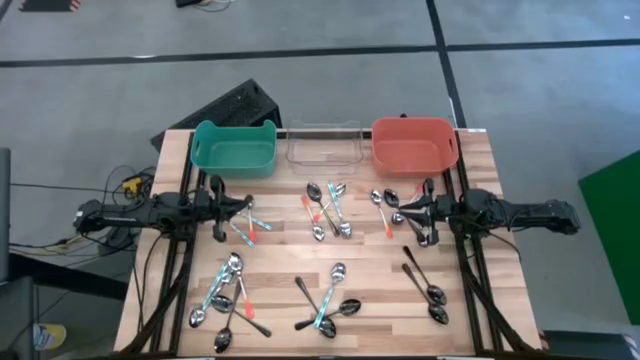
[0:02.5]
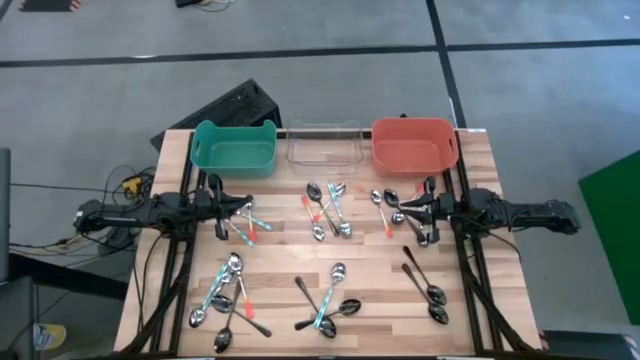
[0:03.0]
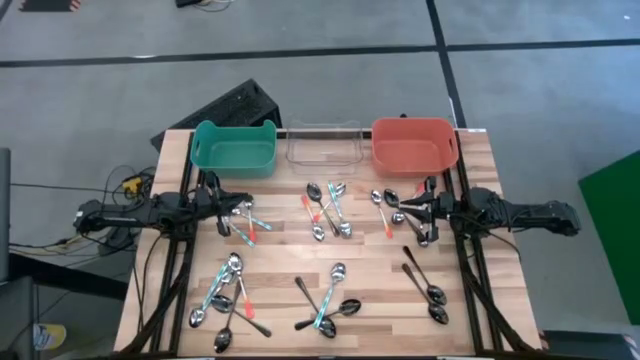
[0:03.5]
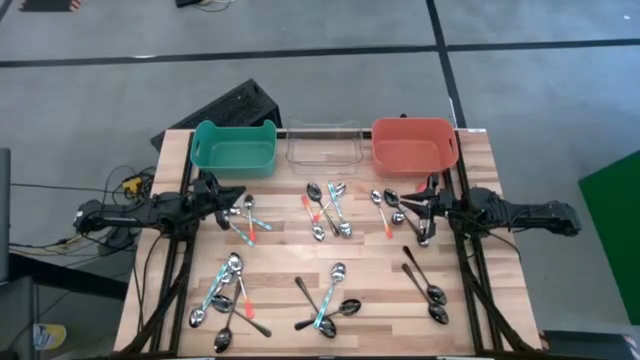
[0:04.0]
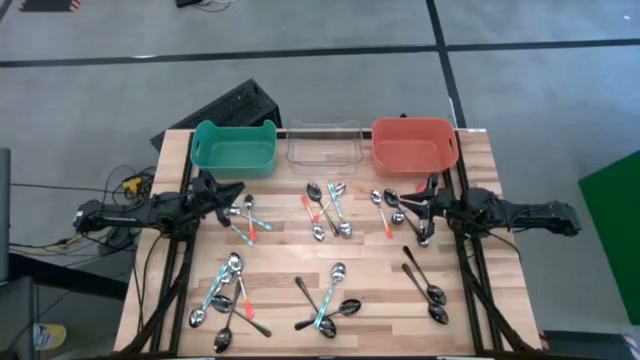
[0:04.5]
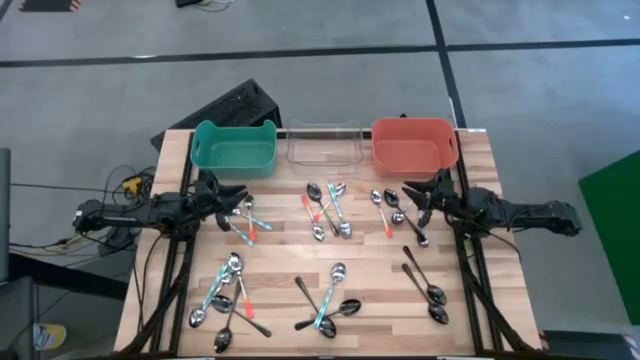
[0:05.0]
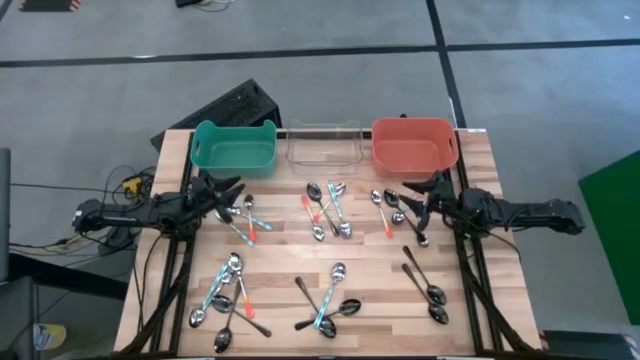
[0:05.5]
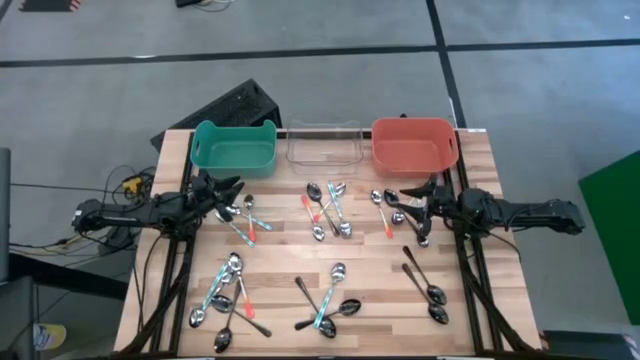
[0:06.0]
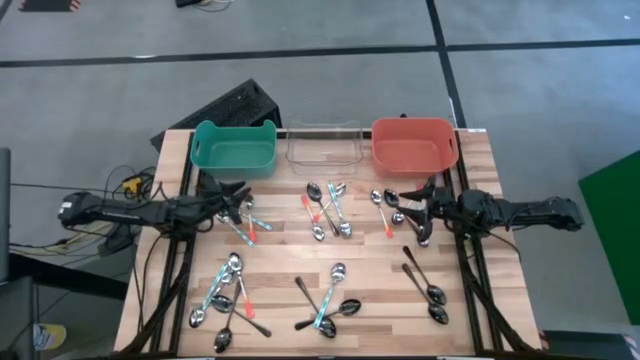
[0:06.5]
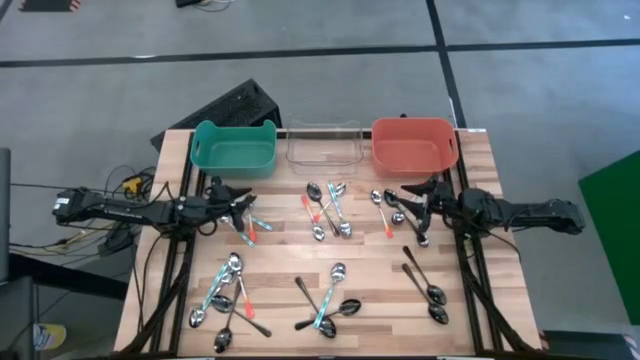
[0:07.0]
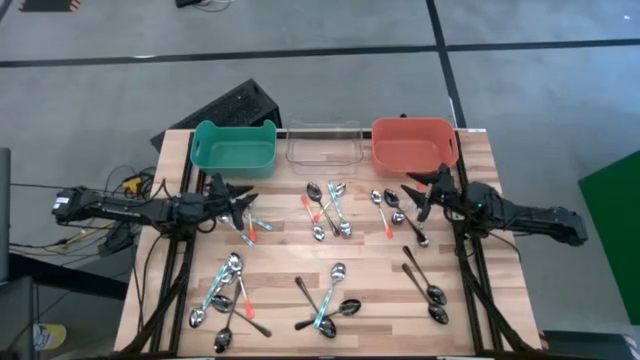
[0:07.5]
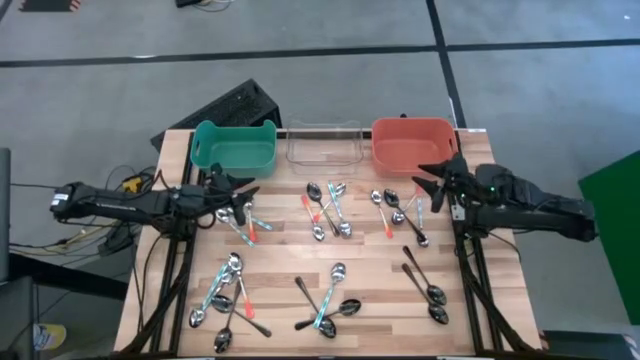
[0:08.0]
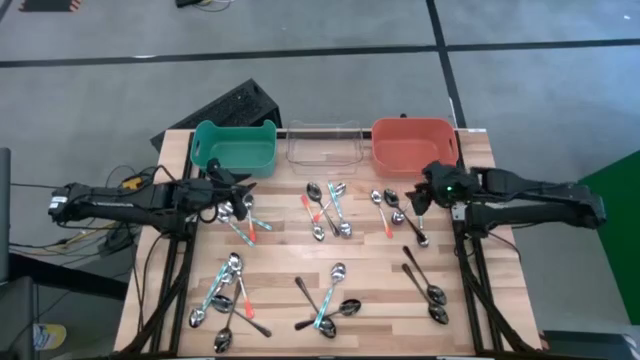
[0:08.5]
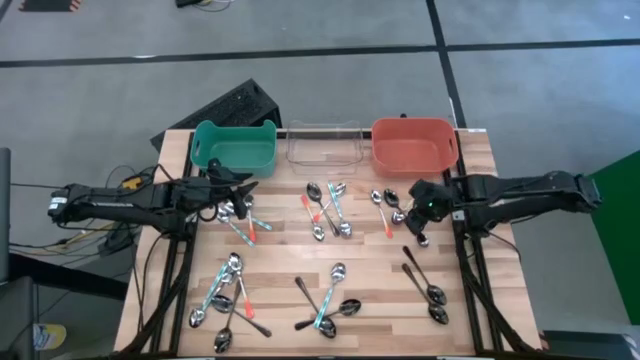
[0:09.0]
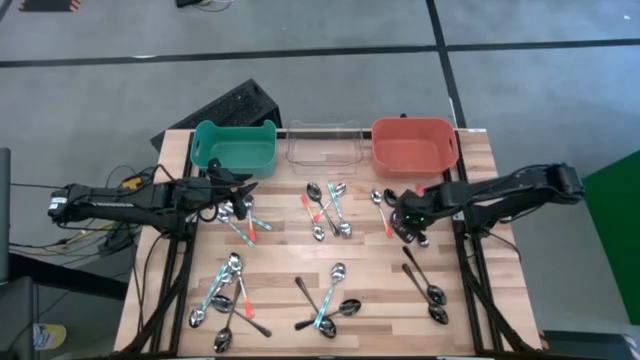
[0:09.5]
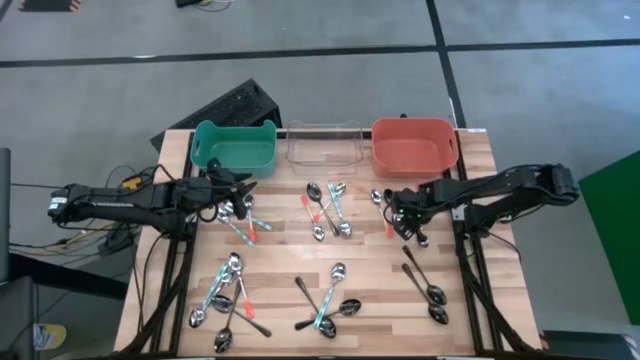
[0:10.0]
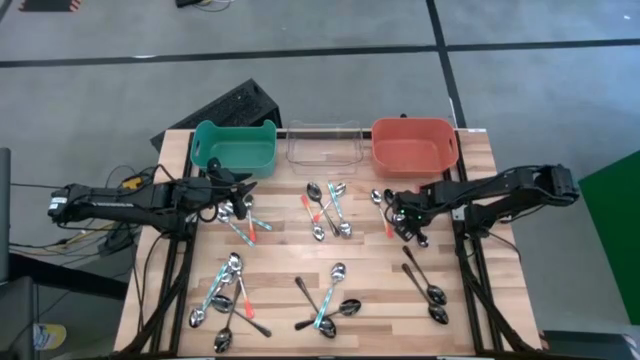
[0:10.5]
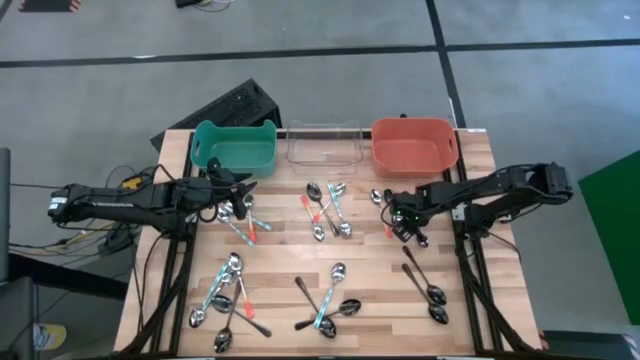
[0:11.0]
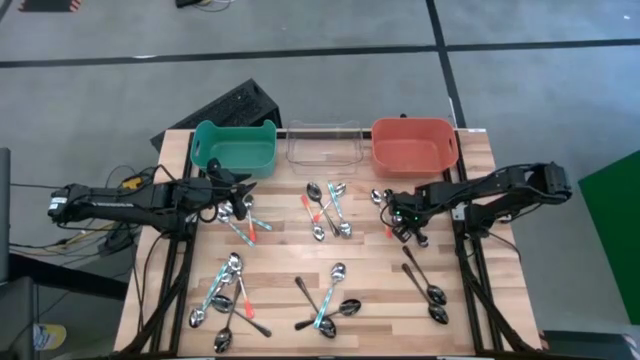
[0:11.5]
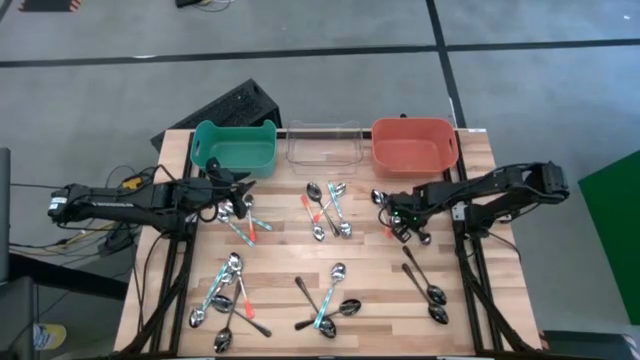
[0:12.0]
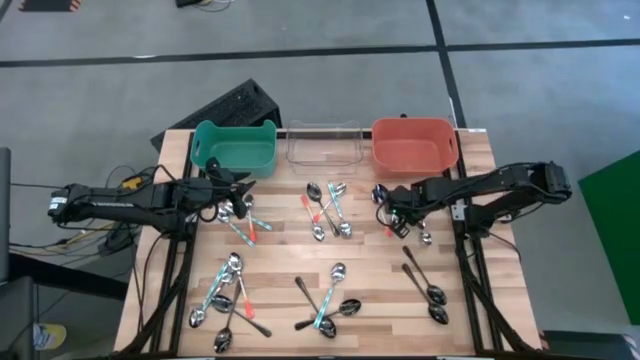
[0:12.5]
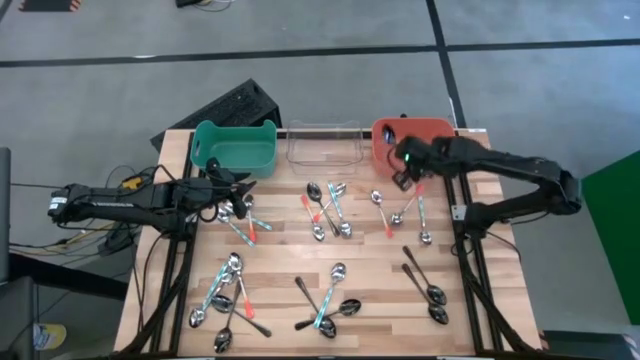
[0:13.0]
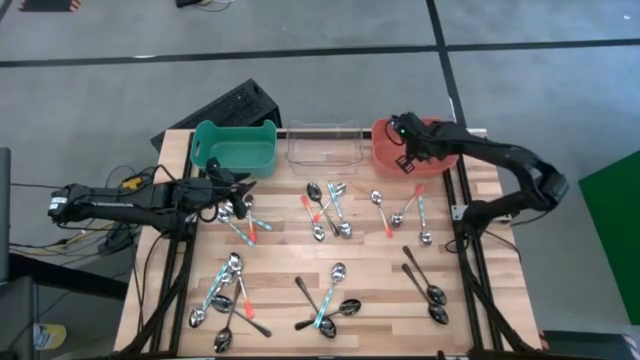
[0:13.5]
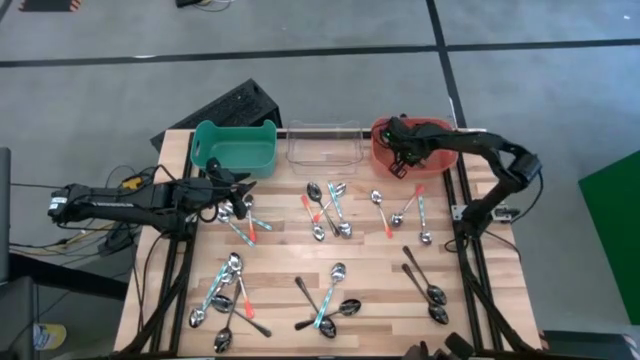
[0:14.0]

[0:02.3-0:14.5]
Task: Sort silverware by color (type)
Put the black spoon into the orange bin

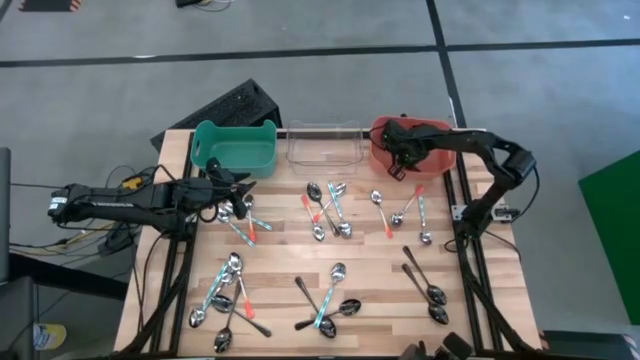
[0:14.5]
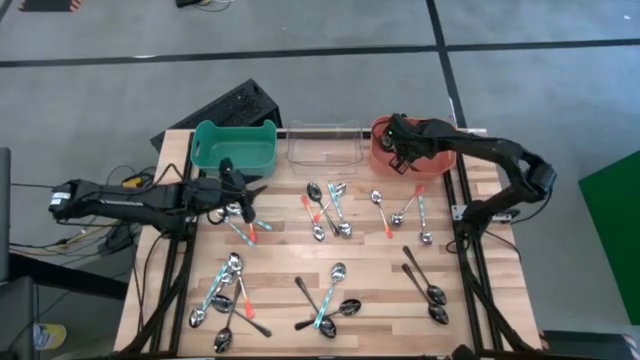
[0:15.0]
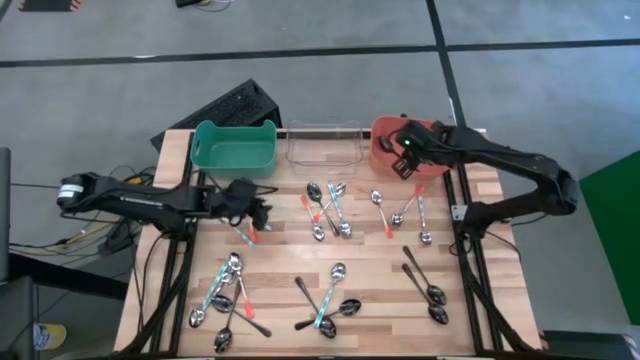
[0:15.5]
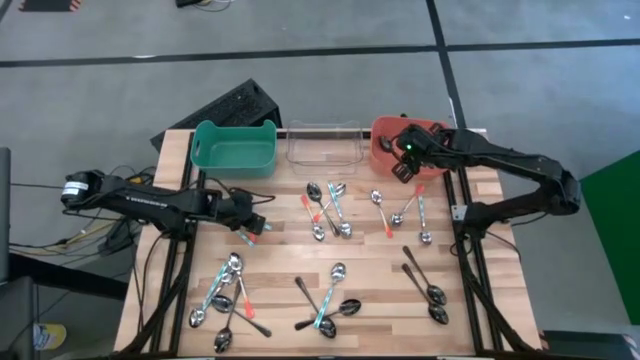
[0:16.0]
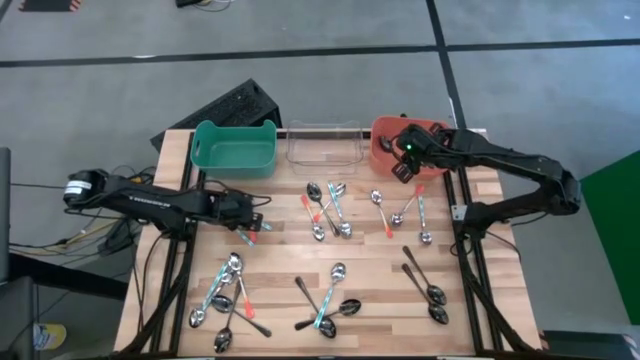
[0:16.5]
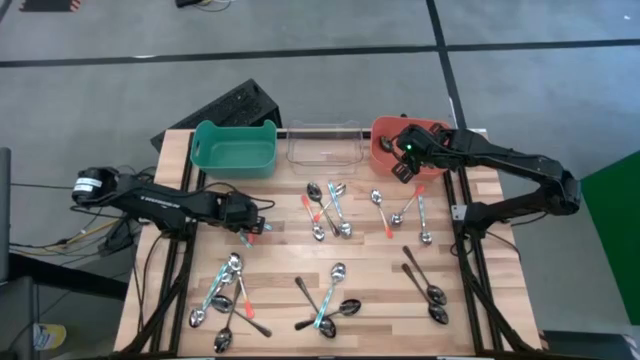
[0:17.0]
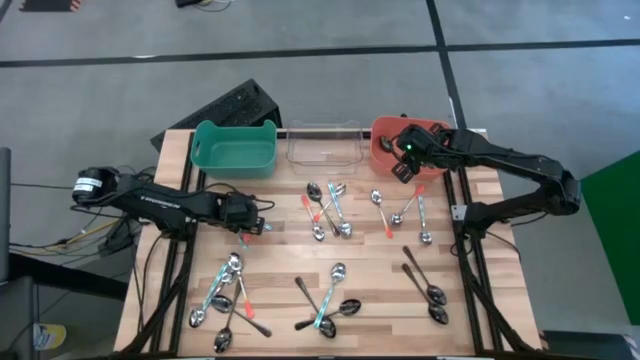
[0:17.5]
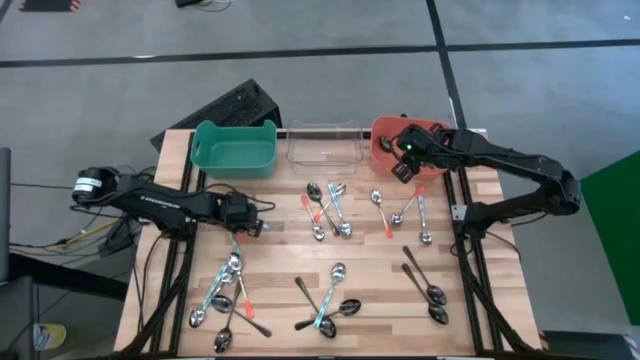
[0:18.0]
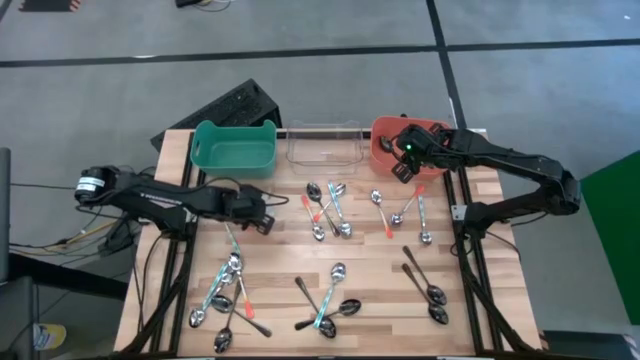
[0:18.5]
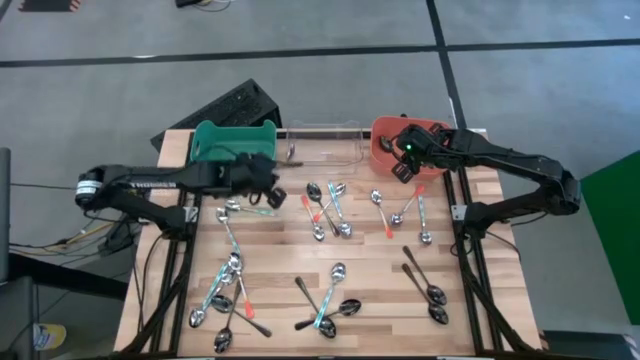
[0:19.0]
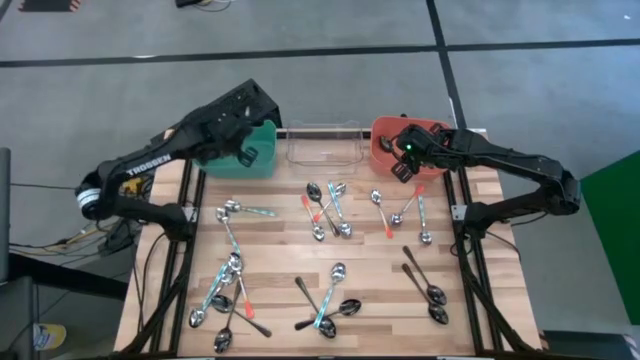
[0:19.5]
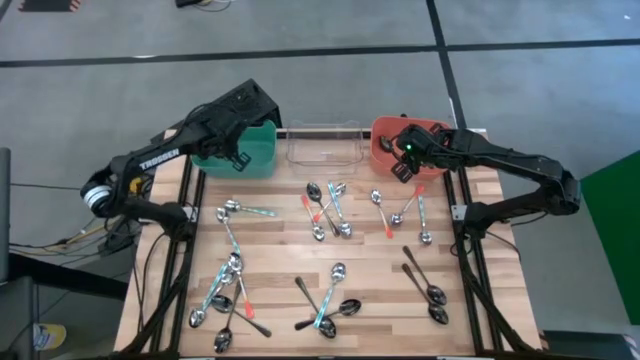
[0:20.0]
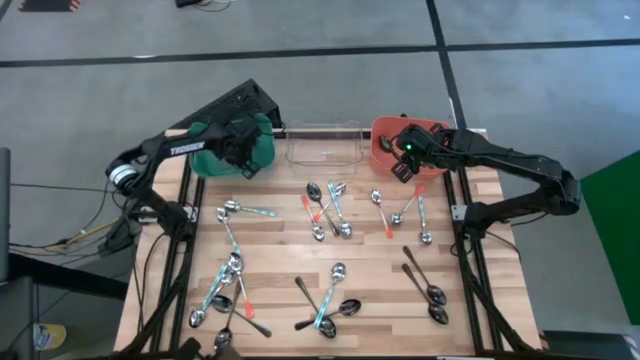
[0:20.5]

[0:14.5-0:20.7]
Put the orange spoon into the green bin

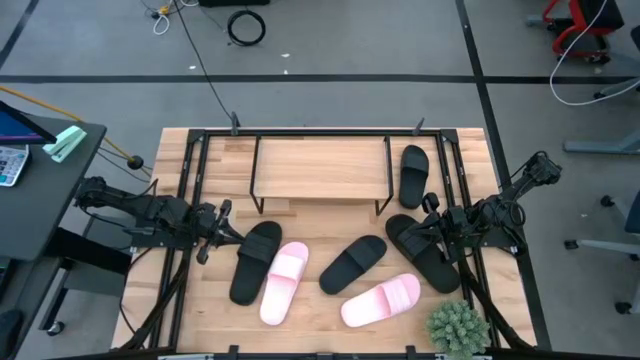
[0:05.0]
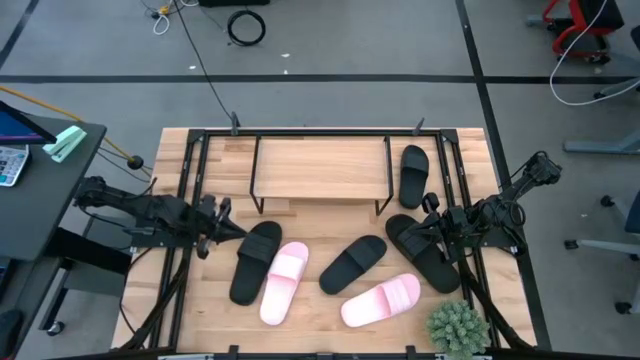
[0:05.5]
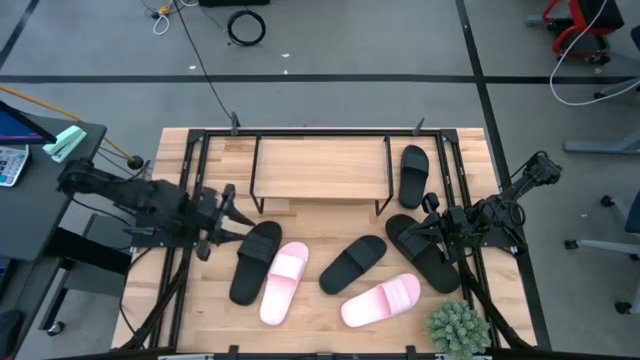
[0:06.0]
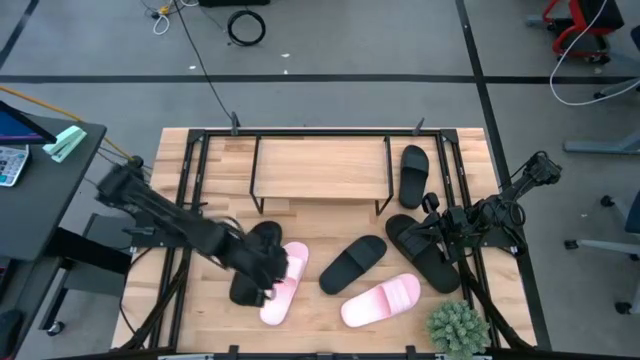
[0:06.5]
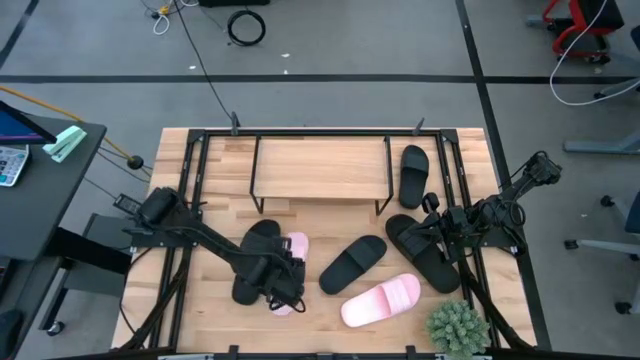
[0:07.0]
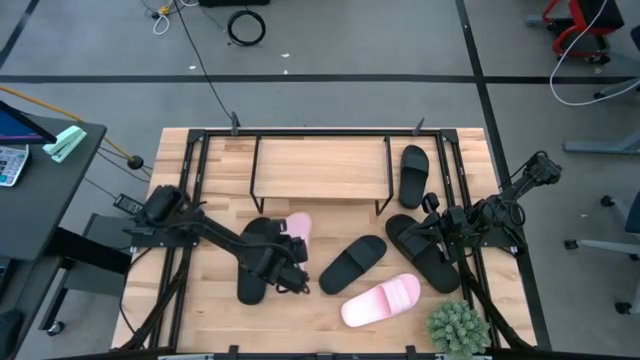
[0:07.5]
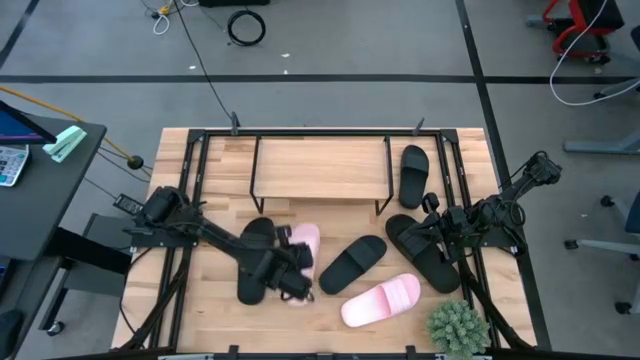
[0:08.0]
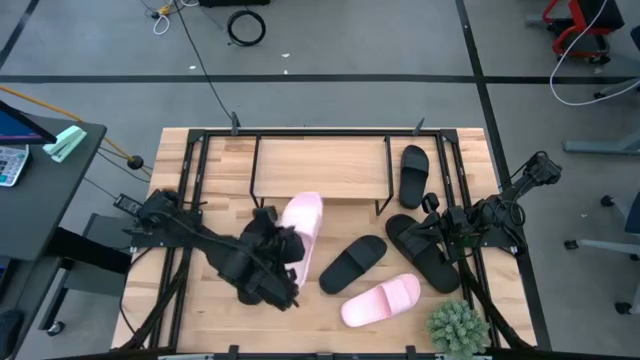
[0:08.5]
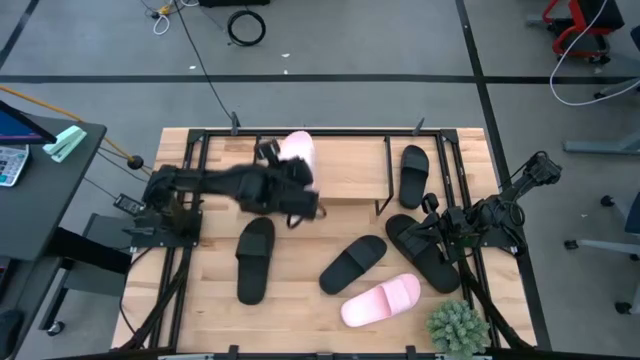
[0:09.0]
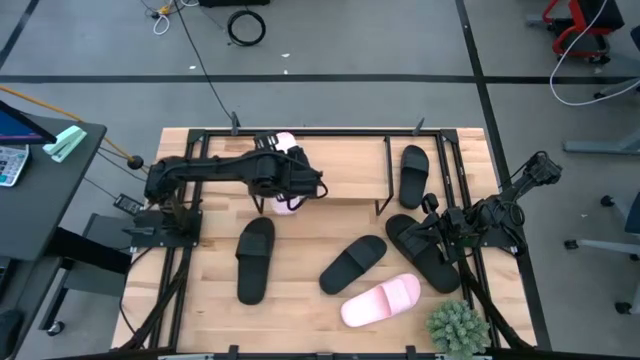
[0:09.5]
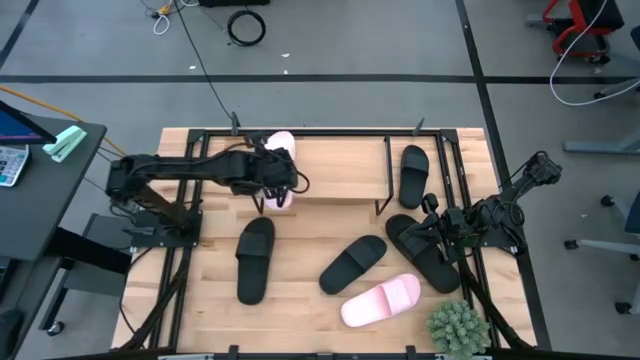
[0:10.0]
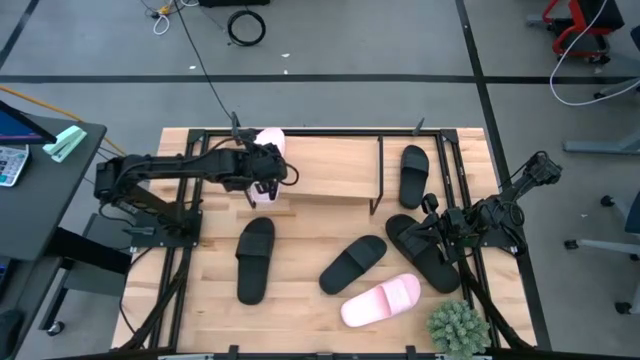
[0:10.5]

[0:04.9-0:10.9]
Task: Pick and place slides into the shelf
Put the left pink slipper on the shelf
